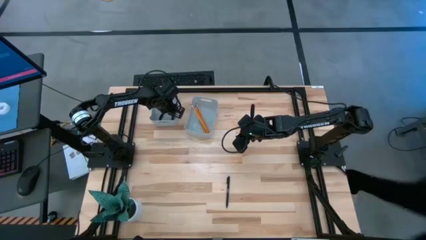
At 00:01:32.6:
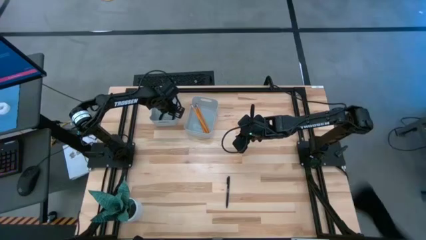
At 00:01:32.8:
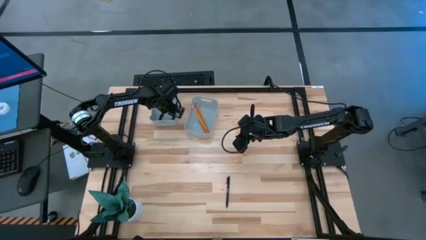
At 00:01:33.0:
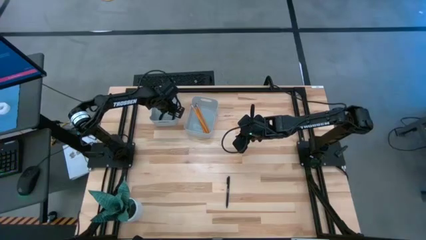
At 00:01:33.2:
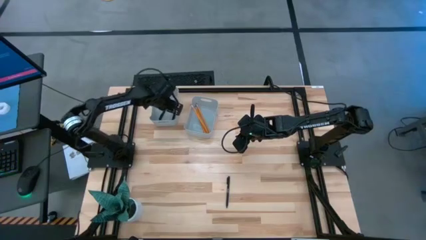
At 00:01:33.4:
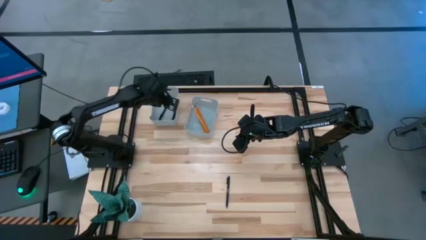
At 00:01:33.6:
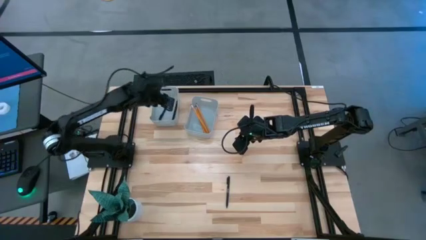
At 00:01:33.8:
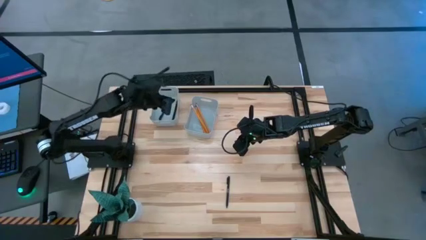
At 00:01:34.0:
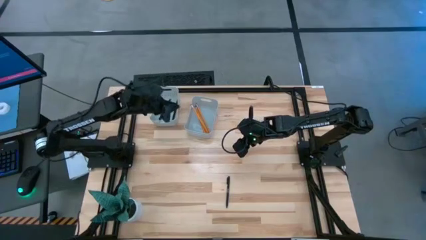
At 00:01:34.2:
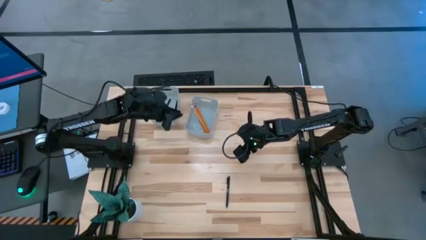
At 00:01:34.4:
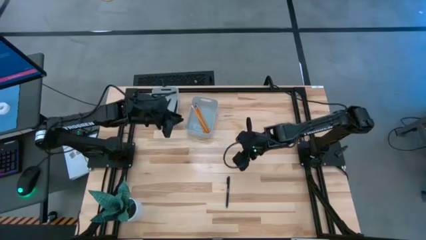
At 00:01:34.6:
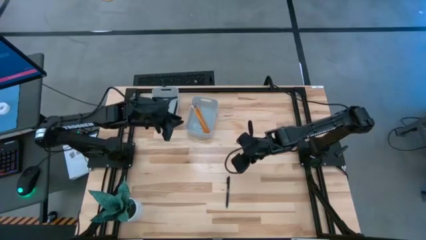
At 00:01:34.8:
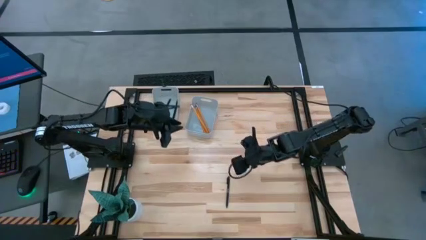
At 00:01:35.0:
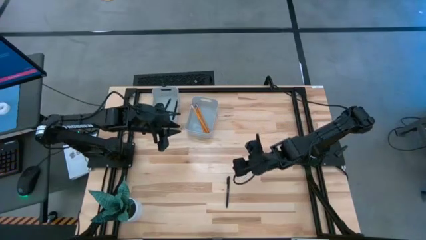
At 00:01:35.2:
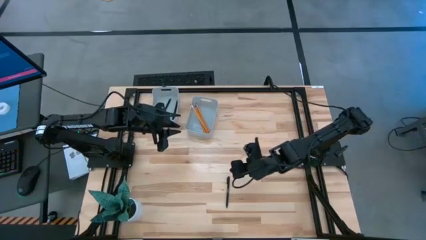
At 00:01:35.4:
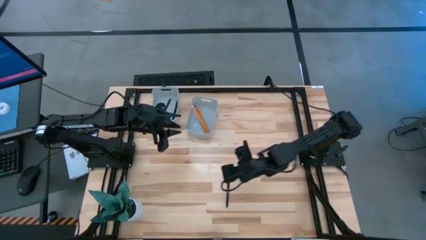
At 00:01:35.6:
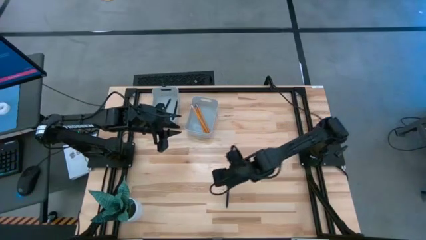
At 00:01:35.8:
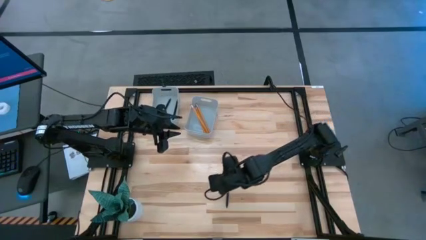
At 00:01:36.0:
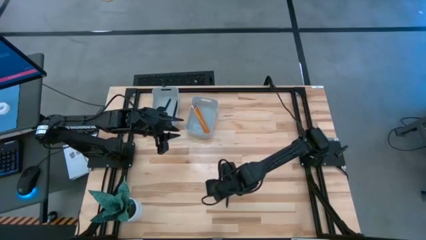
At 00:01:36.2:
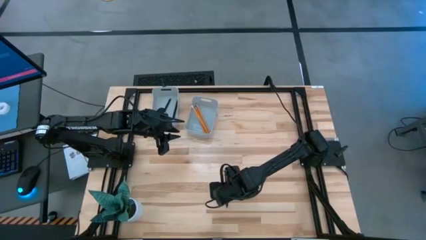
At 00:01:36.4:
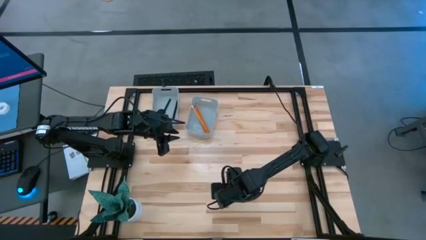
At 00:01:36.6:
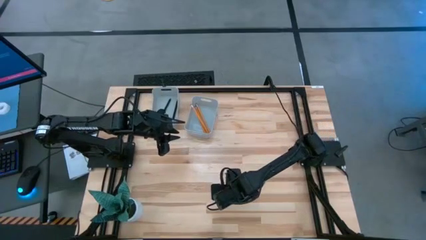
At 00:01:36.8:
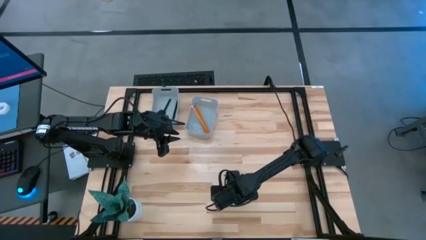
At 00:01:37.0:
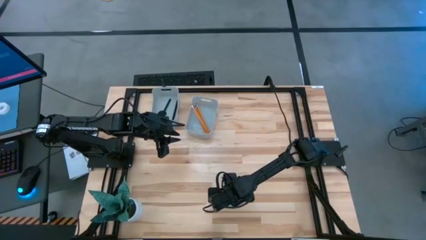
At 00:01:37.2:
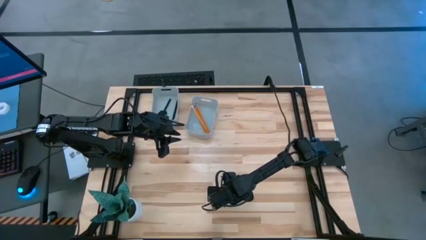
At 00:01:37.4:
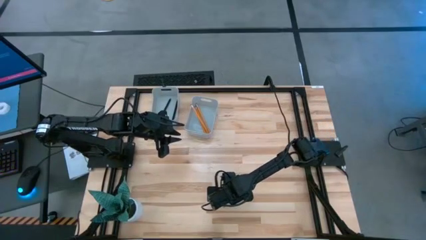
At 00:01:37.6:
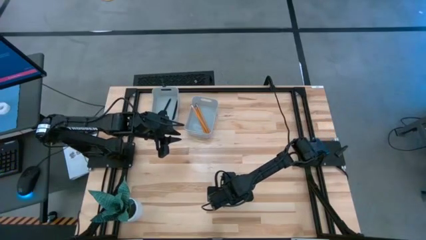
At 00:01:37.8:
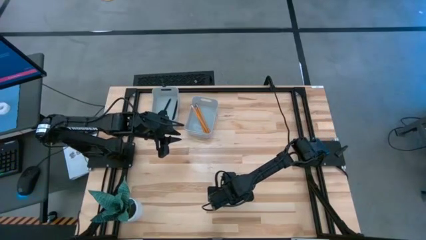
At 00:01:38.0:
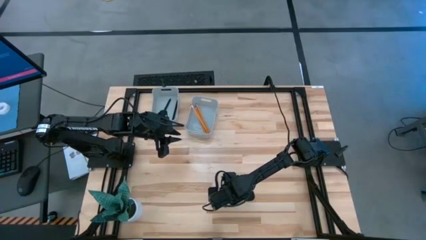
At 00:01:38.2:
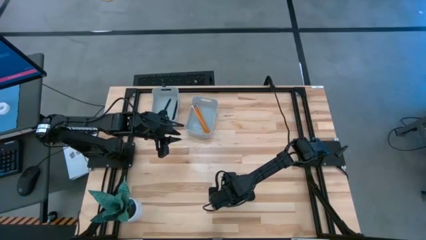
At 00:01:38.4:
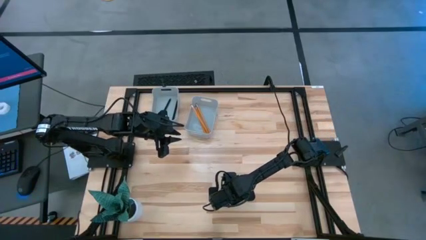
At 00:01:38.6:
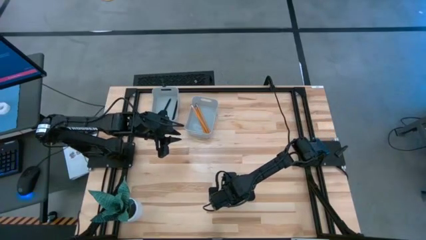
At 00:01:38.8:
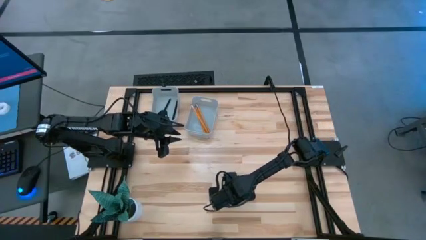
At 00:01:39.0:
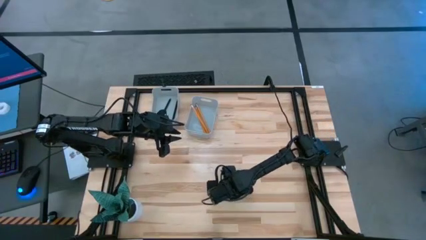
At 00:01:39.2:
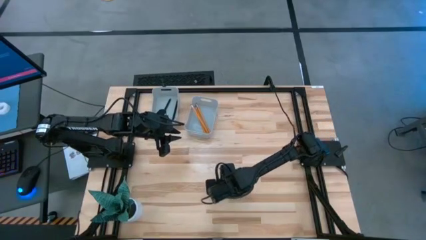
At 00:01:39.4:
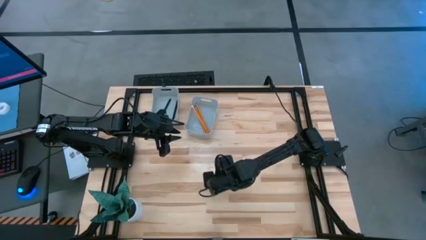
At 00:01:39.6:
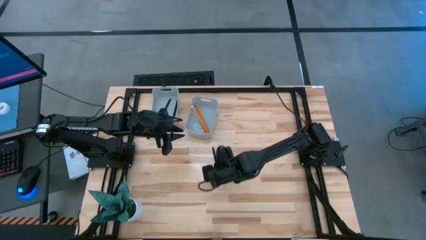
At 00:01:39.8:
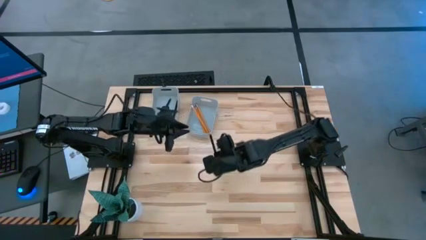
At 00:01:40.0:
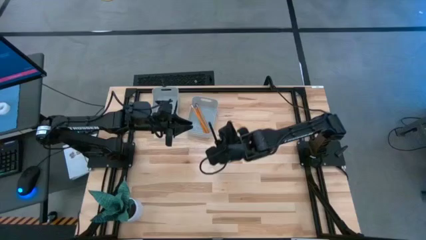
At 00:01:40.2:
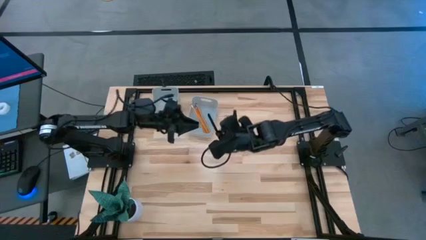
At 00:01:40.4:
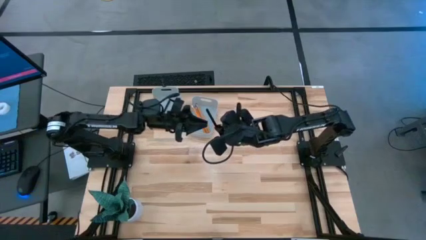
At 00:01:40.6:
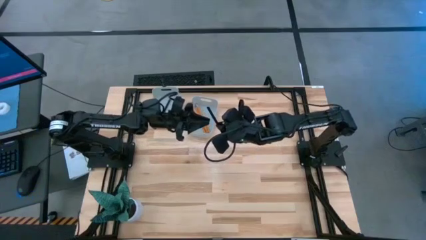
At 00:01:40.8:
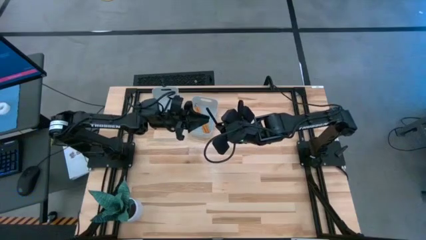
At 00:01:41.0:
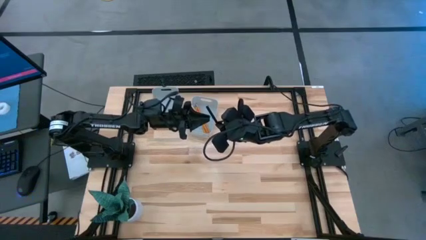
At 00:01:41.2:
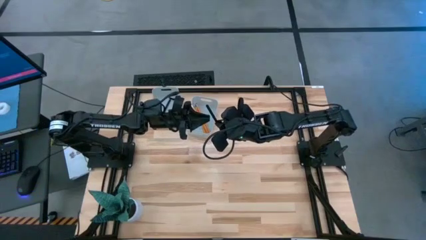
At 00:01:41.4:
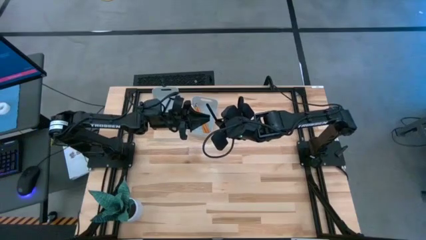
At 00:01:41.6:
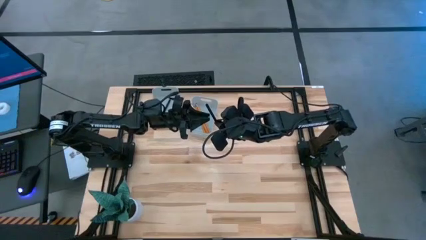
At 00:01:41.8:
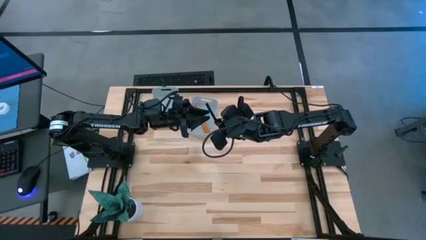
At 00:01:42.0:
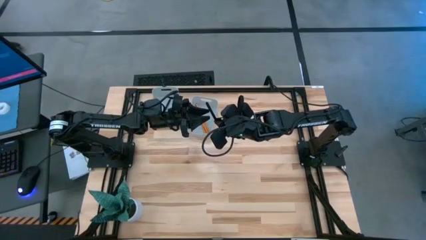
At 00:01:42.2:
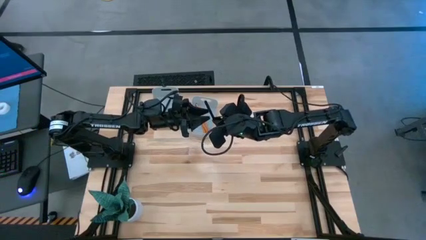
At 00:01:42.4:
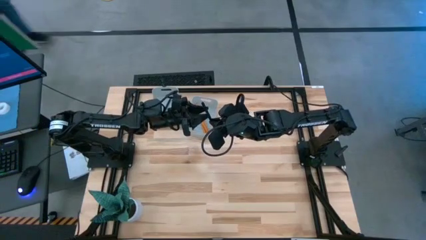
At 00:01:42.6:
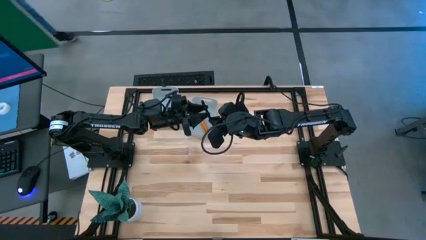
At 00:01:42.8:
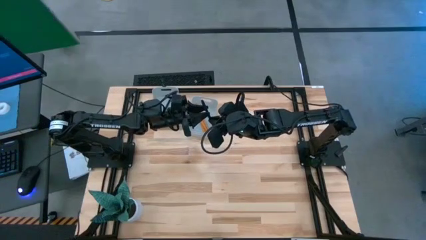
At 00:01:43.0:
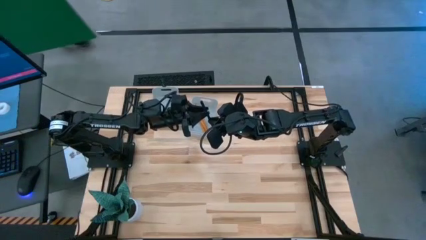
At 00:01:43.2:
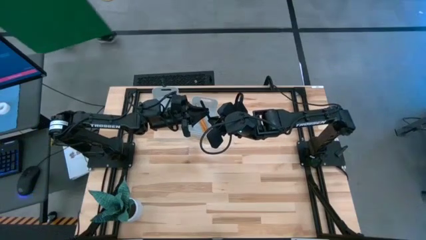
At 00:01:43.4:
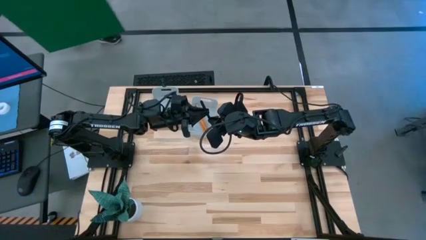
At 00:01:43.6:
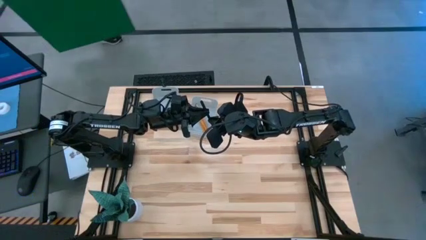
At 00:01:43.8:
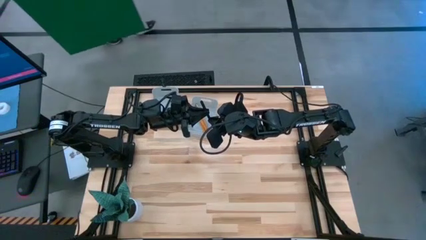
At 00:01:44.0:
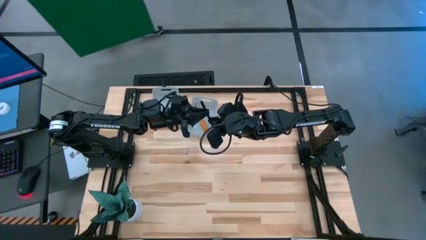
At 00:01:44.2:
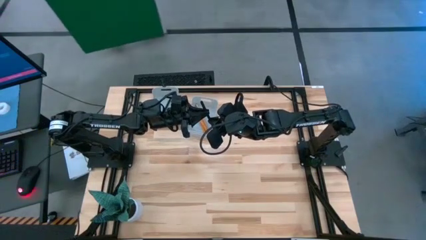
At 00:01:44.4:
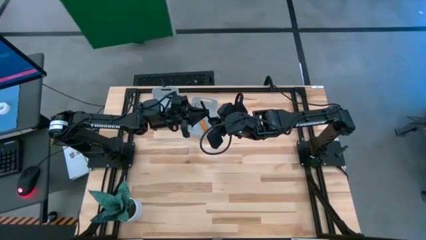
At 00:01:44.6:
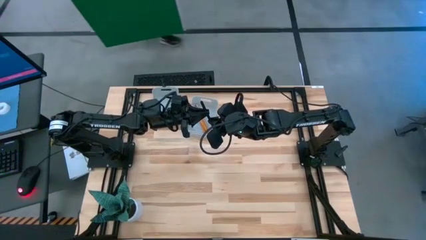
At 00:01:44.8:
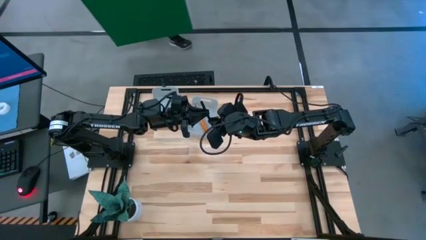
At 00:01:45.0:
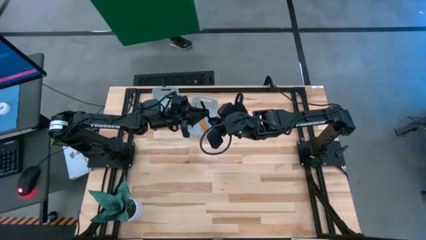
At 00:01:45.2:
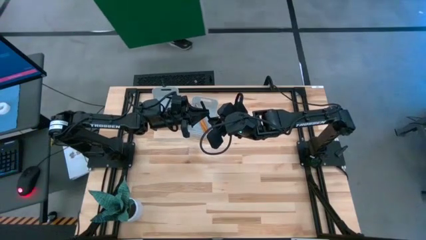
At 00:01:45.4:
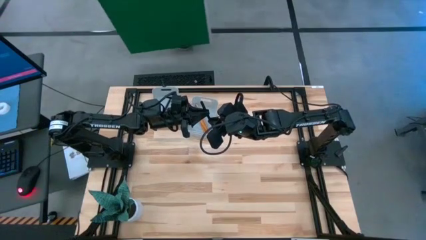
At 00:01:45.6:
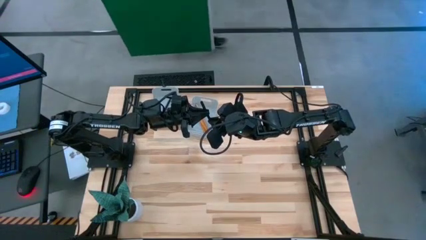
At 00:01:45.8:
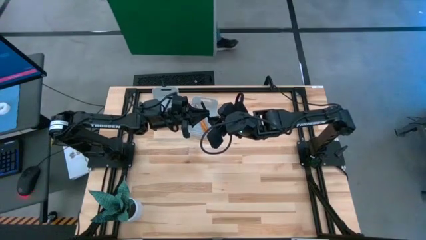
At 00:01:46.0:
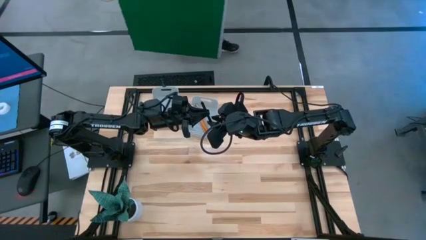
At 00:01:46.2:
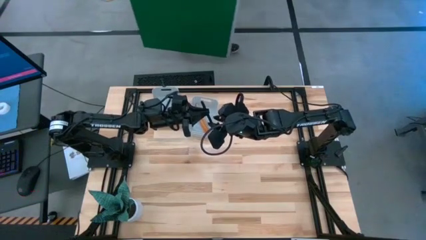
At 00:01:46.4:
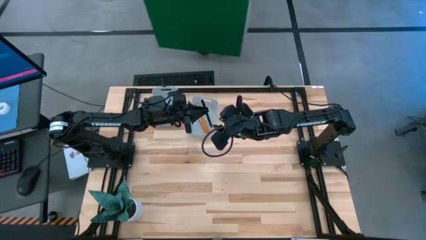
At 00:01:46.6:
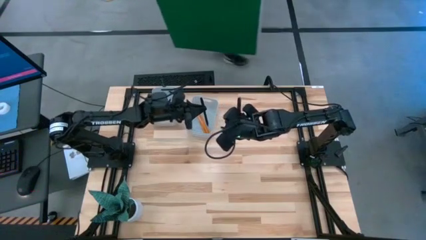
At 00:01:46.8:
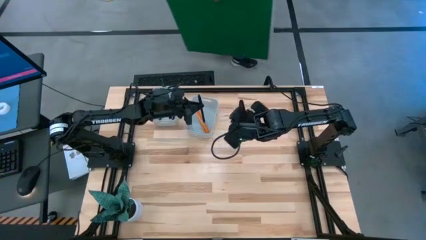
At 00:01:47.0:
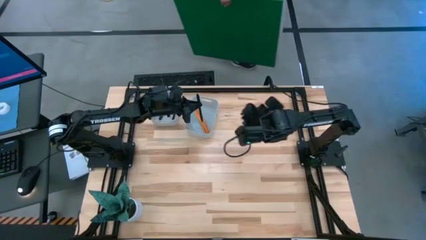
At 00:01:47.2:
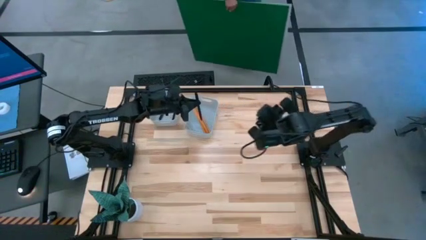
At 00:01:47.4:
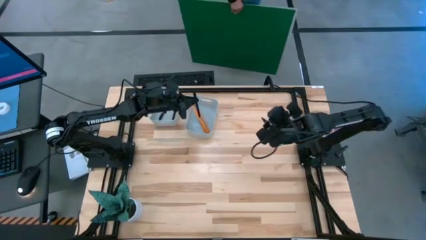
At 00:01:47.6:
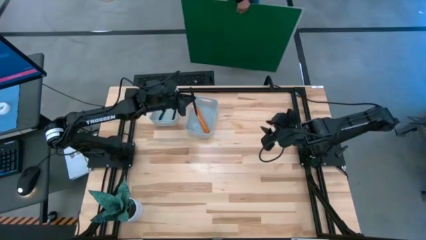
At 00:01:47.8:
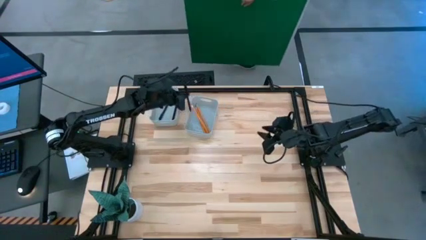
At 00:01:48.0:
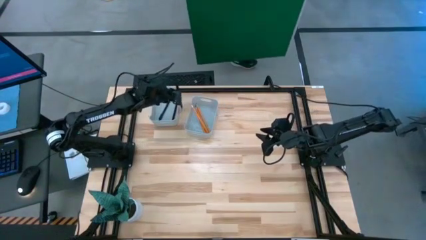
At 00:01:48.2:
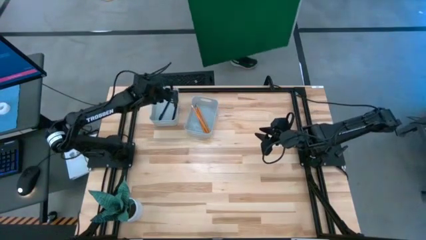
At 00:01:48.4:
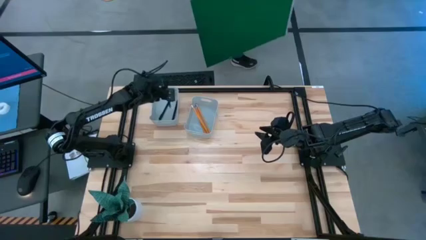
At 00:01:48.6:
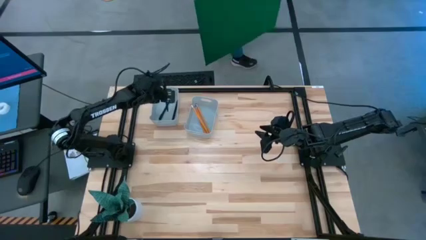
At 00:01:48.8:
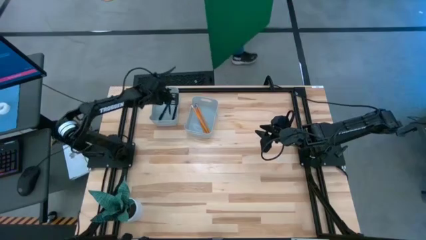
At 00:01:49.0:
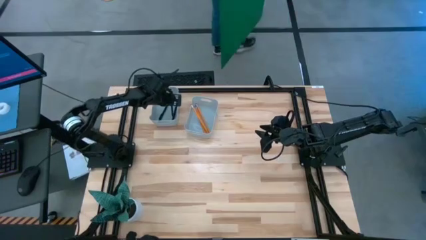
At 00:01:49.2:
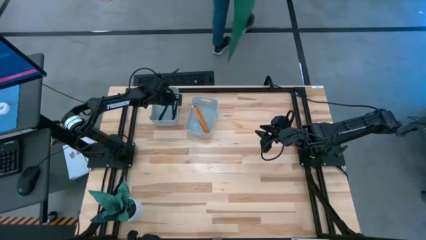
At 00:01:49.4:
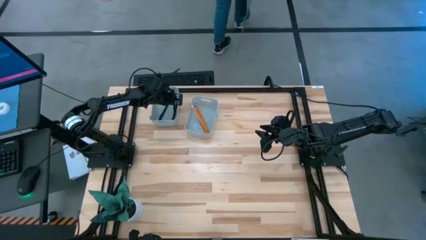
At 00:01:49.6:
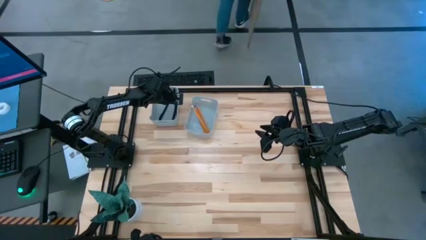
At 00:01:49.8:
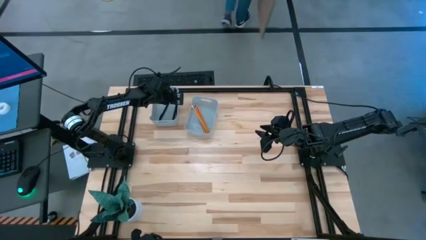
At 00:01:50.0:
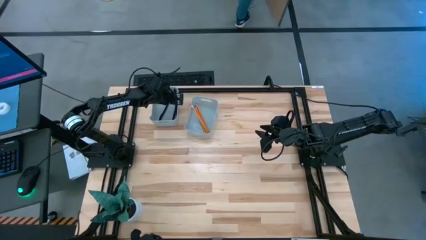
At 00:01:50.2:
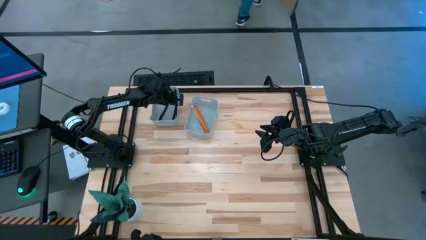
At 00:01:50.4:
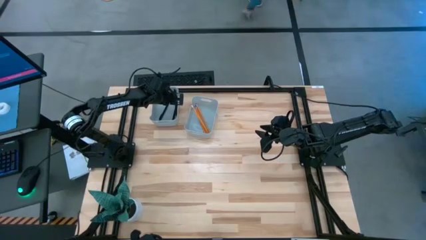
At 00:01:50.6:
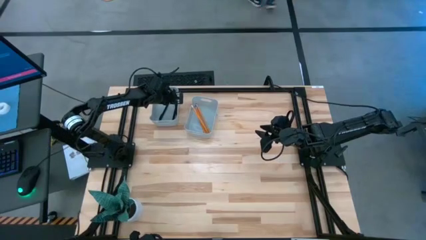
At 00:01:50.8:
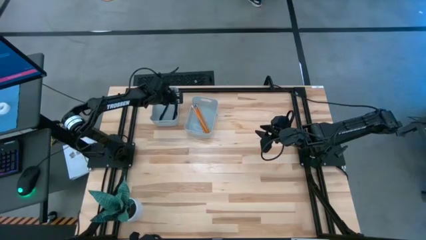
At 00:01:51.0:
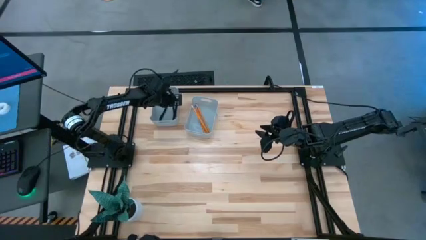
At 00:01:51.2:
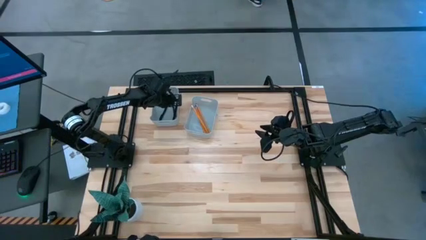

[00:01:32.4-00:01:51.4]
Task: Sort pens & pencils
Put the black pen into the left gray bin
